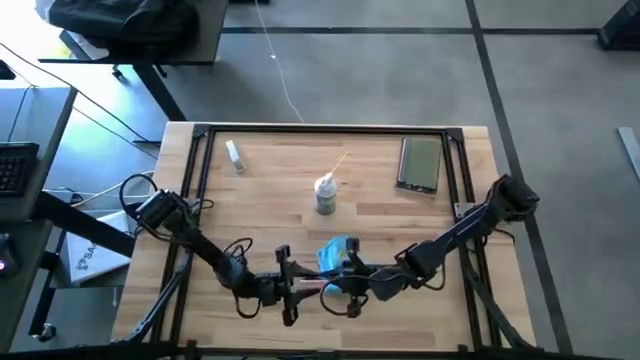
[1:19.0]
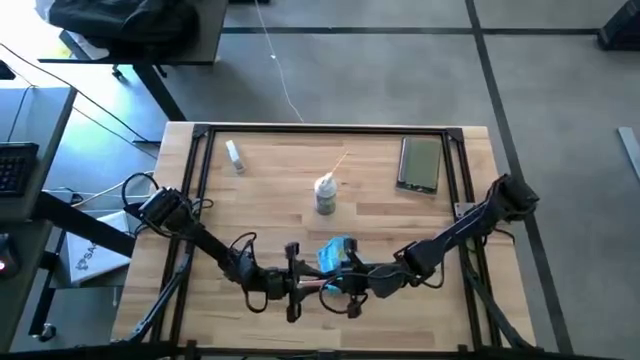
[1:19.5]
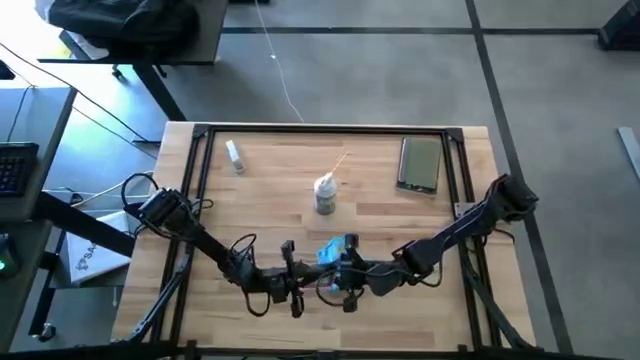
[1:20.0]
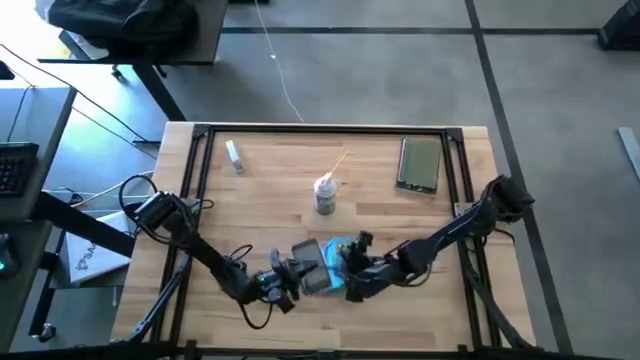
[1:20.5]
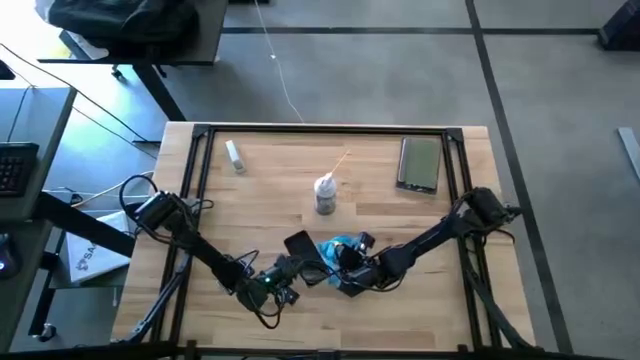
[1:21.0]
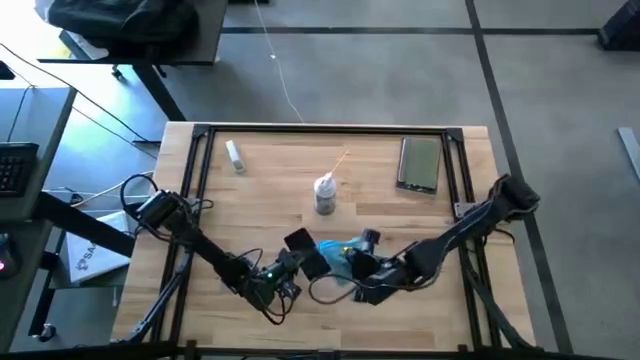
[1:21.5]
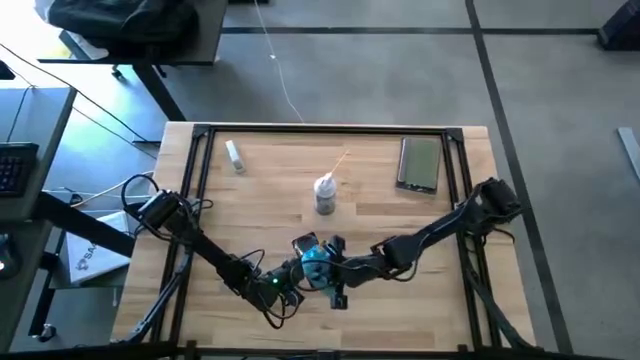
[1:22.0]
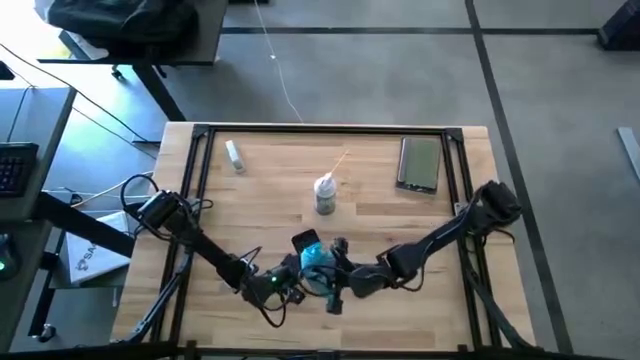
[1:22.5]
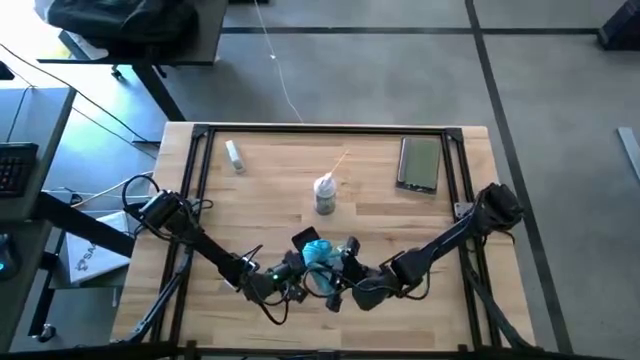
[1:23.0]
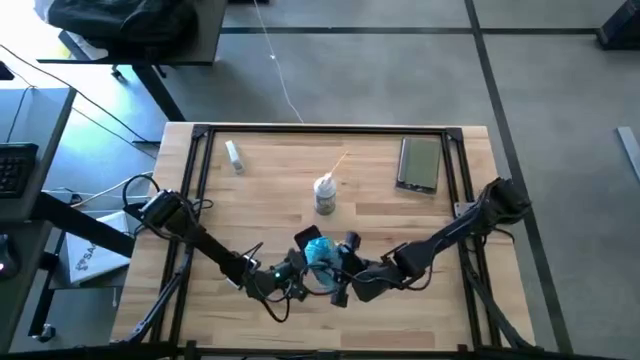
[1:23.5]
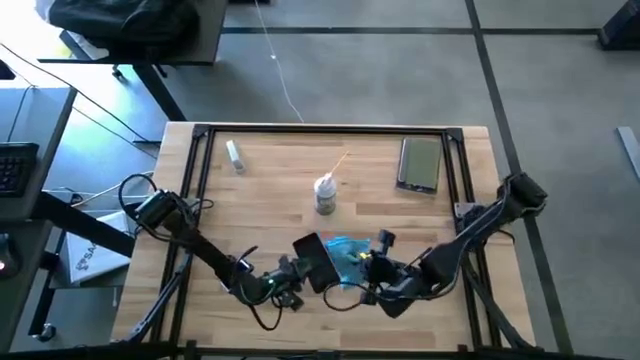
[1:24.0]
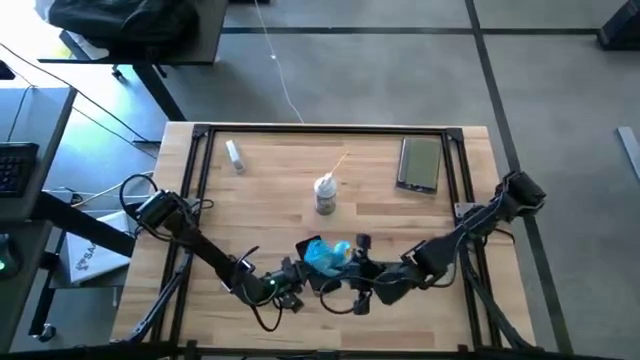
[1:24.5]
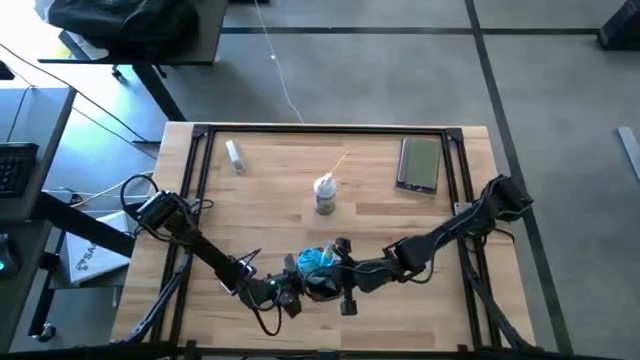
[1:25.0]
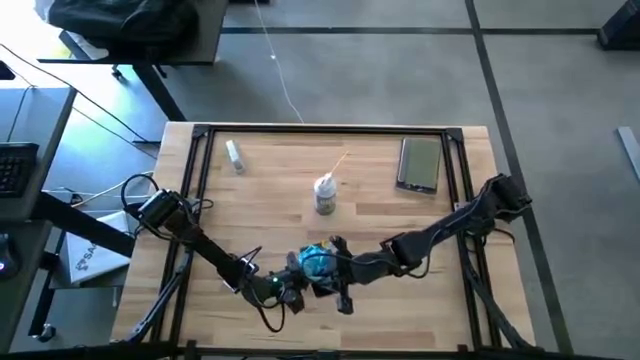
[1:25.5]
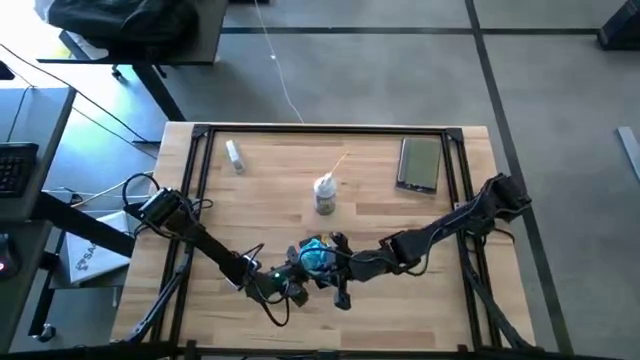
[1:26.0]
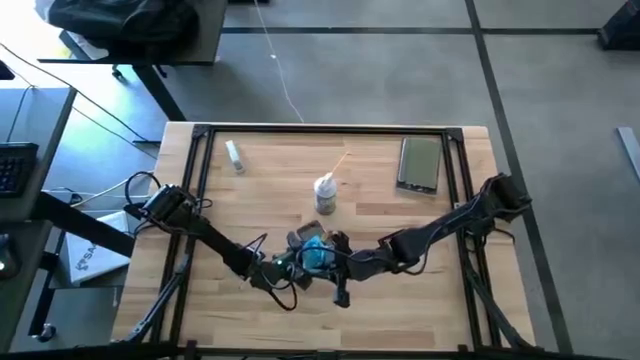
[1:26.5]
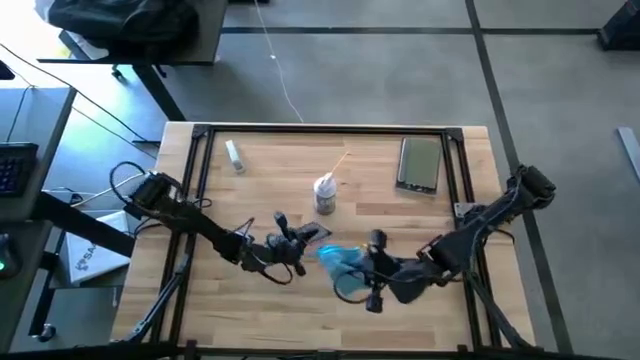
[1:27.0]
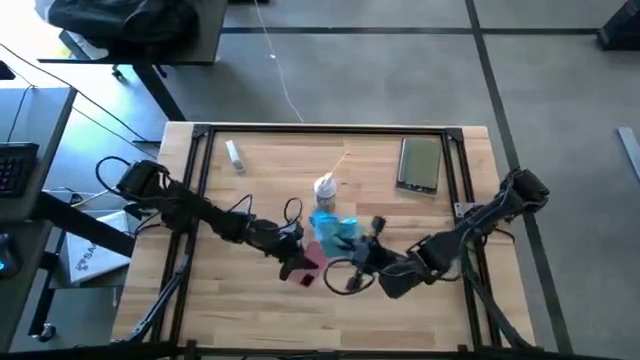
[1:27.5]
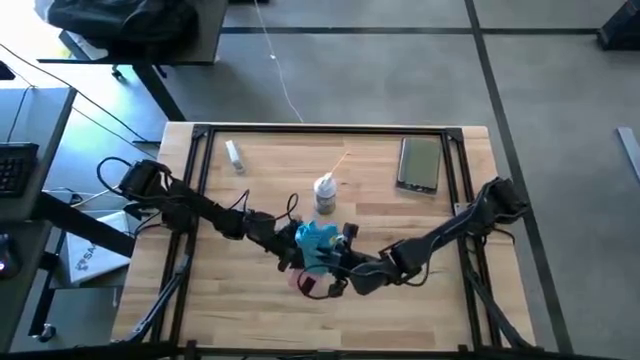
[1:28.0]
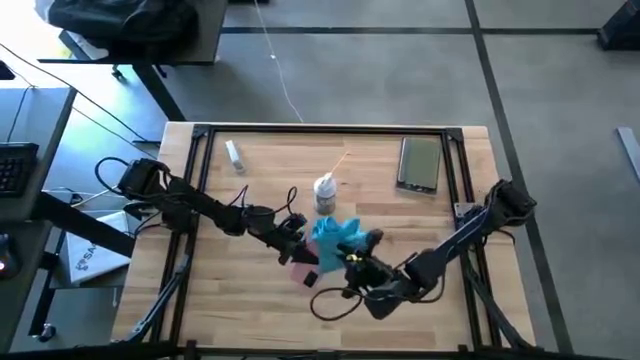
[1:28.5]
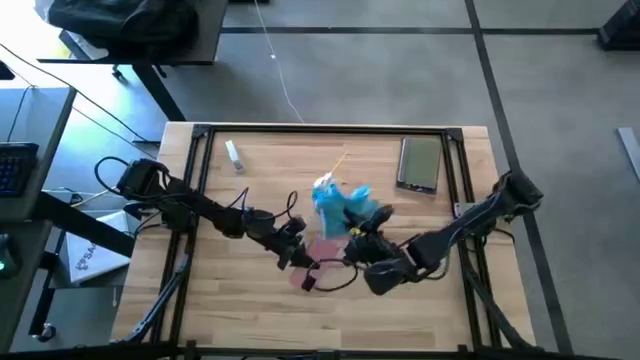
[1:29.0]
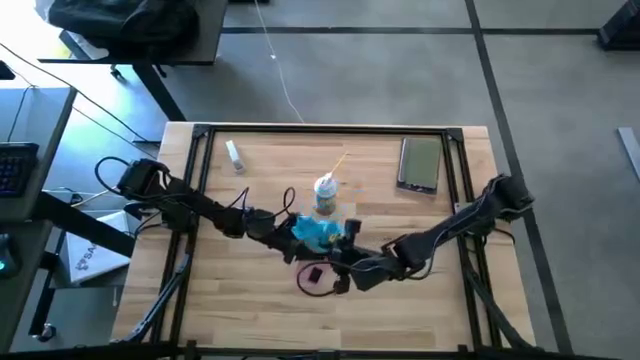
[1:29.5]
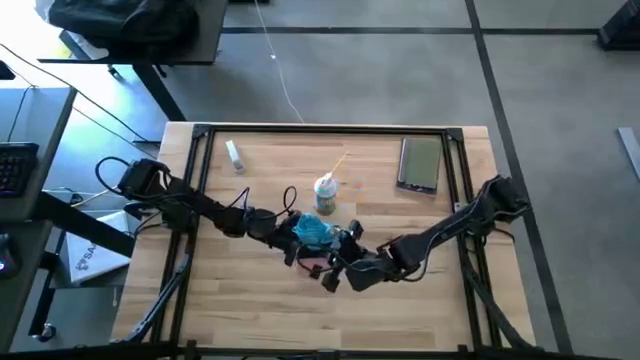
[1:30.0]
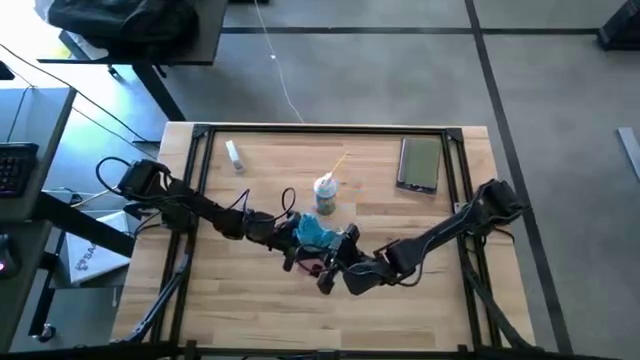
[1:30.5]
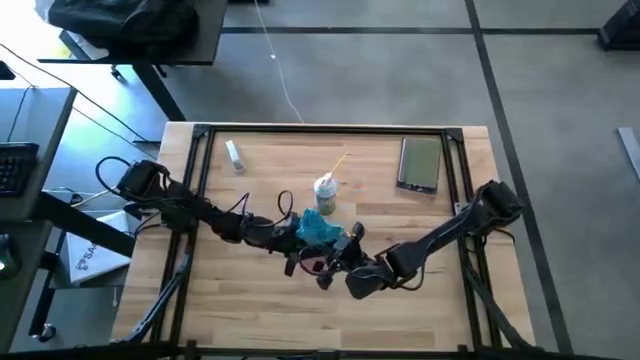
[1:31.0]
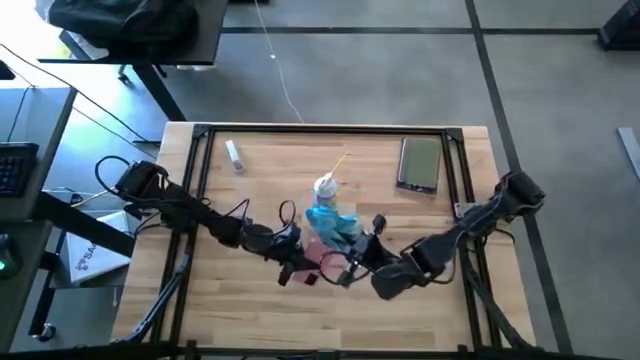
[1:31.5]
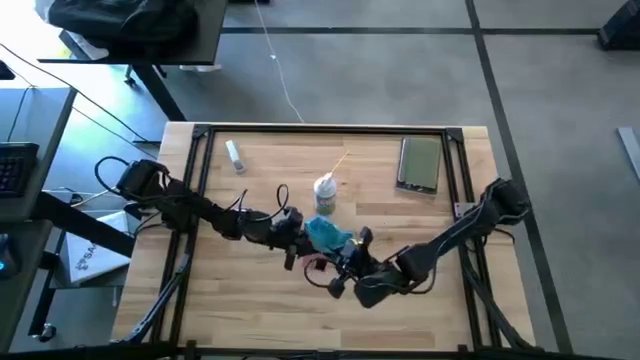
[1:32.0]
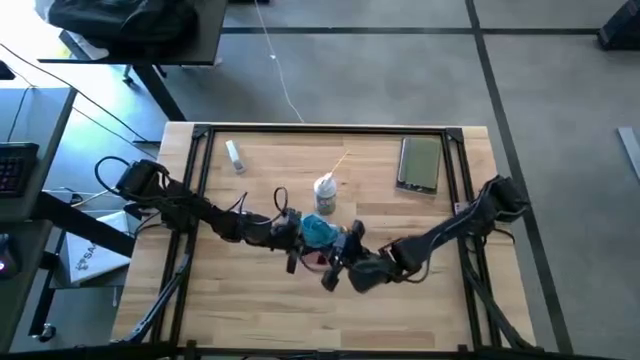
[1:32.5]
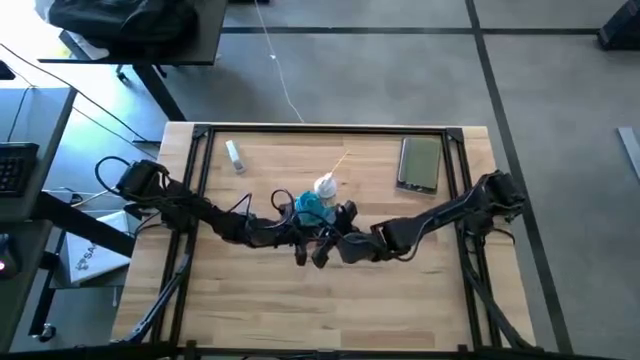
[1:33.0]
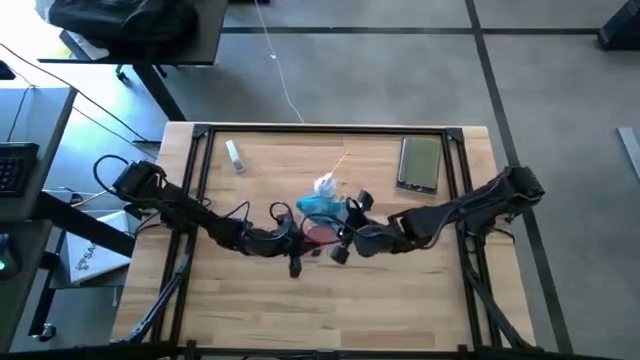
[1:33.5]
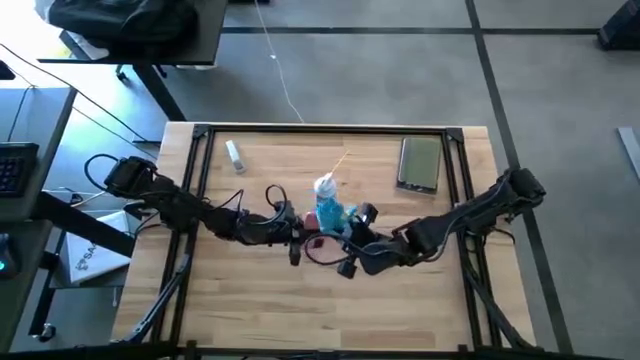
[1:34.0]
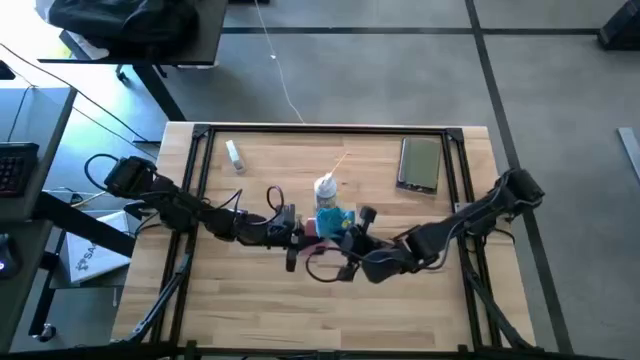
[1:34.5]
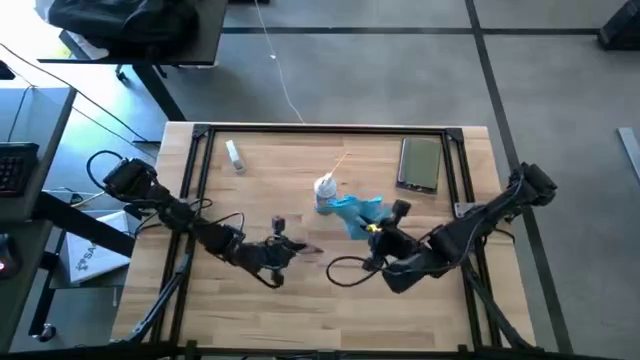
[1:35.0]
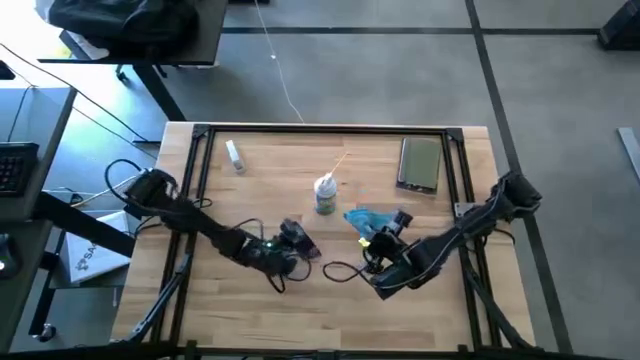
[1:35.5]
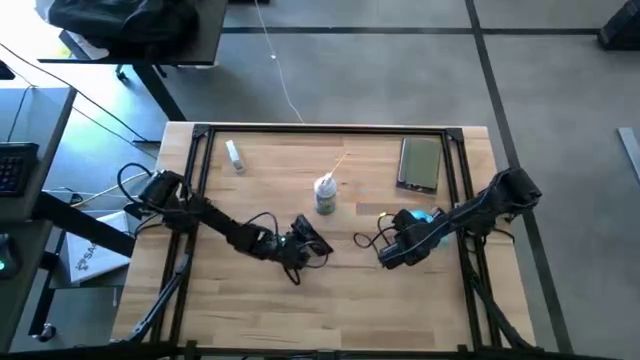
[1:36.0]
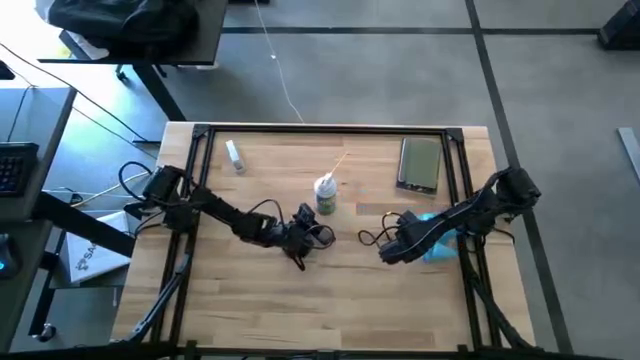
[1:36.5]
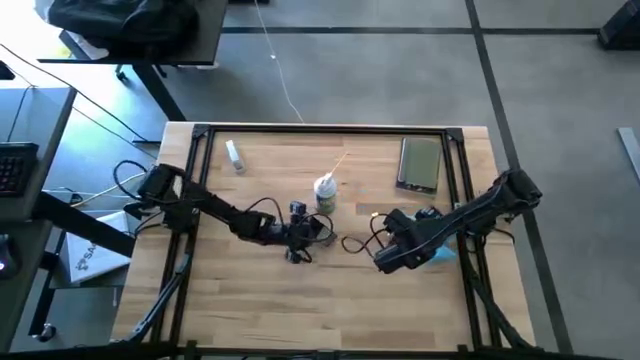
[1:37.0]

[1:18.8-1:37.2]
Task: Apply microfiber cloth
Wipe the back and front of the cellphone with the blue microfiber cloth

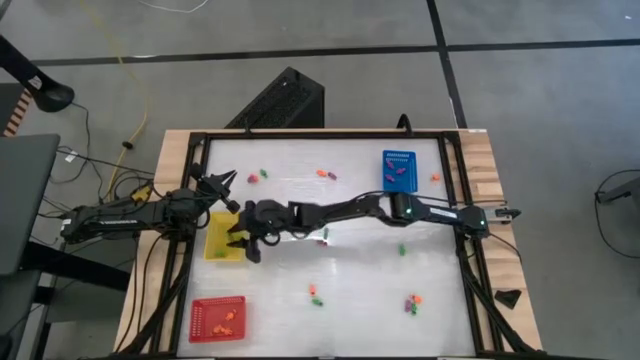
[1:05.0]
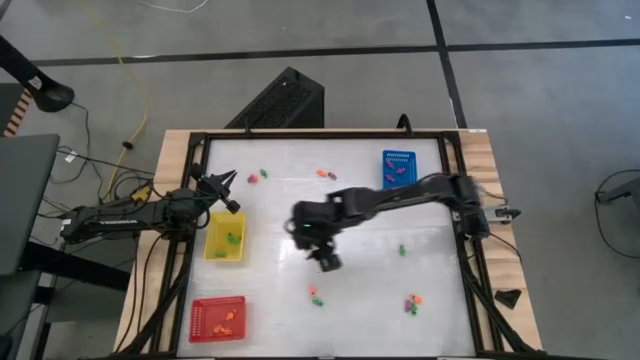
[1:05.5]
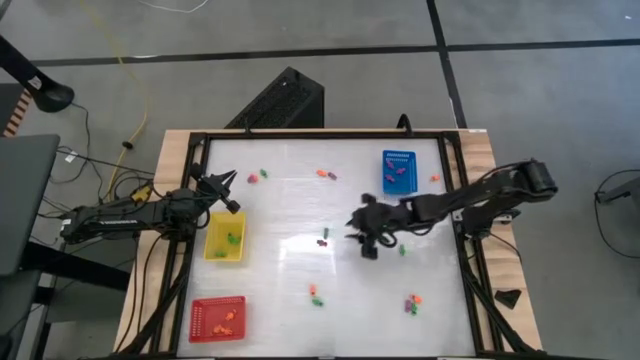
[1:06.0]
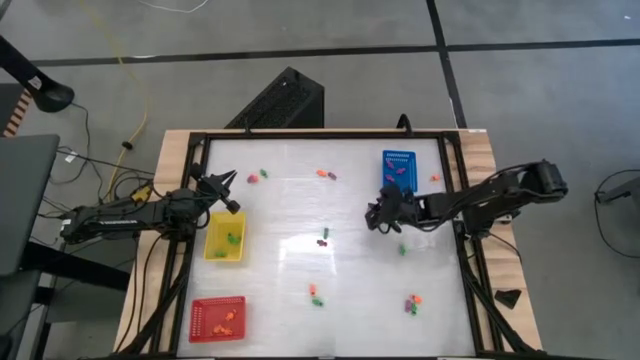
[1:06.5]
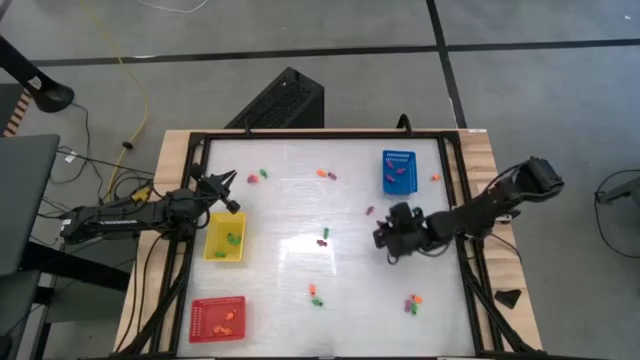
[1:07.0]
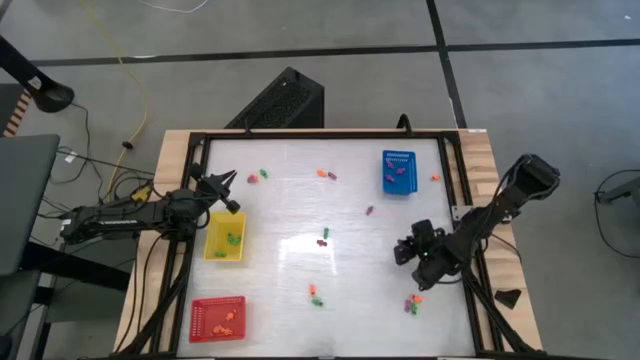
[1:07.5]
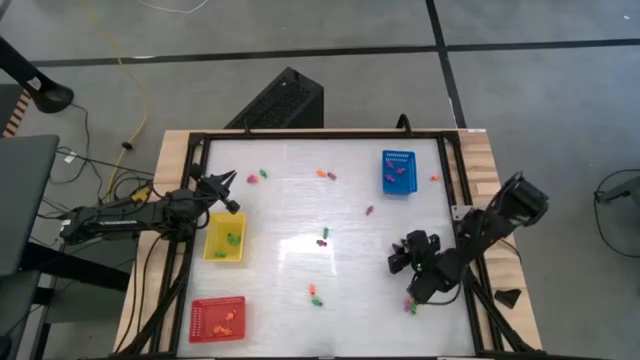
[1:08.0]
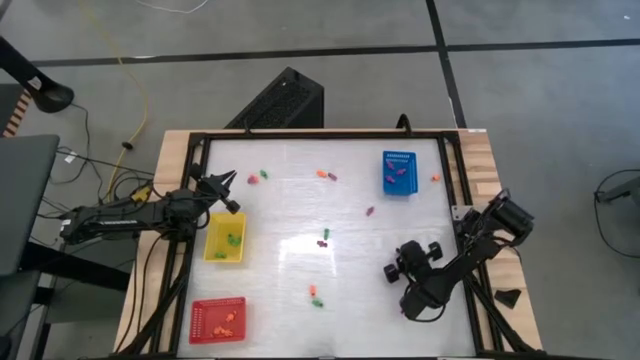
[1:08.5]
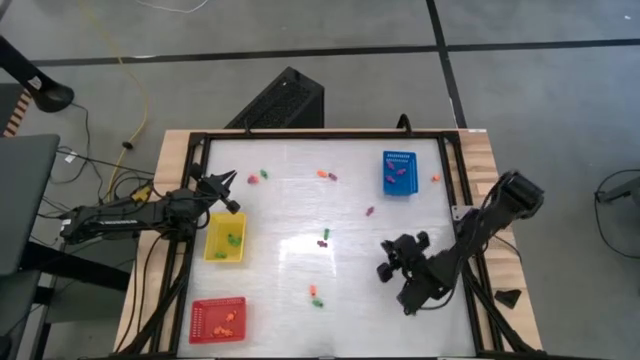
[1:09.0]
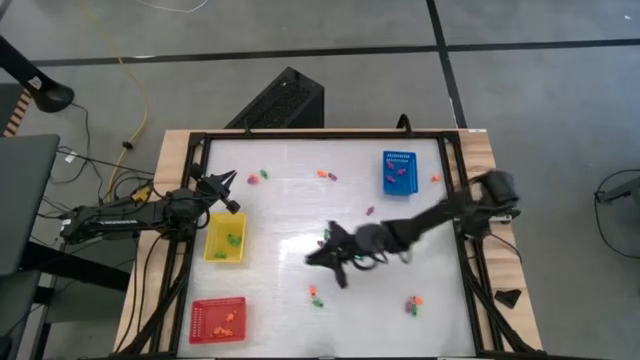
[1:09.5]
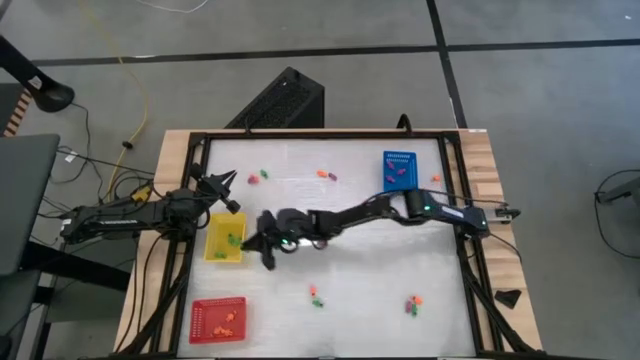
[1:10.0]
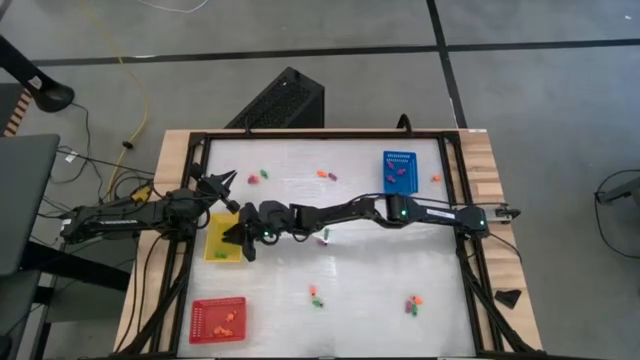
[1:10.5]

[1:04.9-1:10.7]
Task: Sort Halloween decoration
Put the green skeleton toy into the yellow bin
